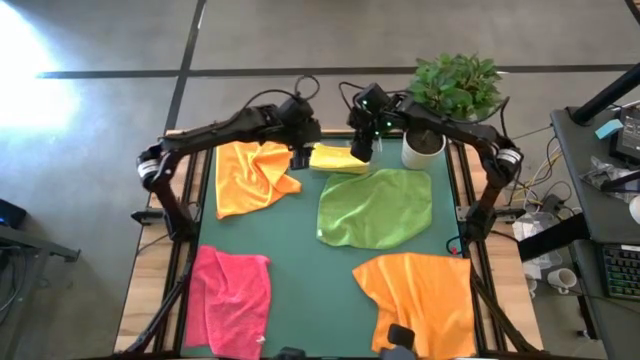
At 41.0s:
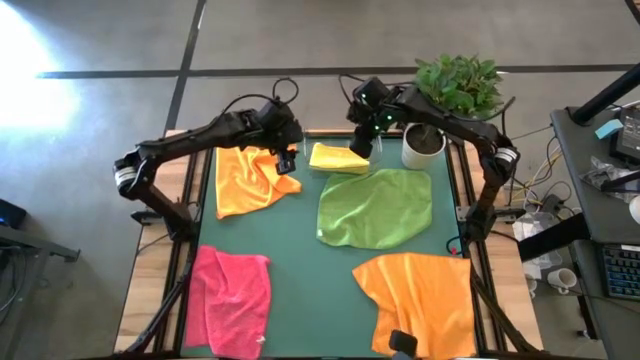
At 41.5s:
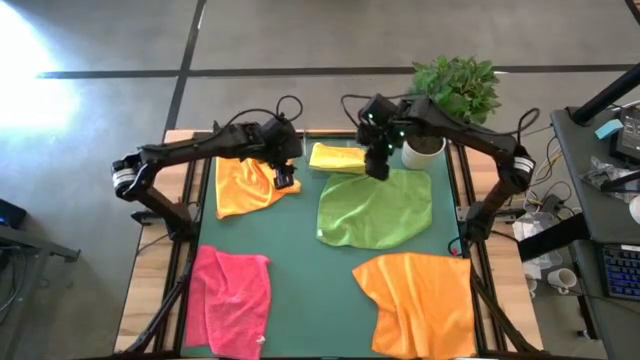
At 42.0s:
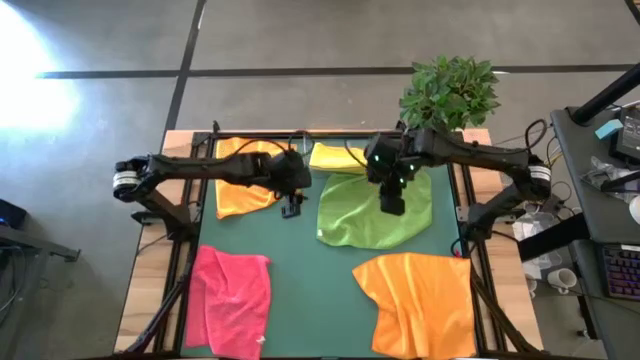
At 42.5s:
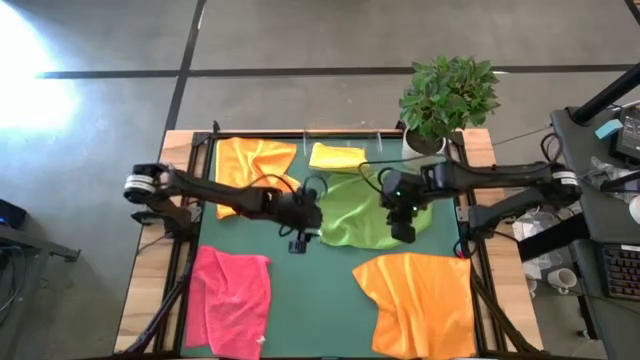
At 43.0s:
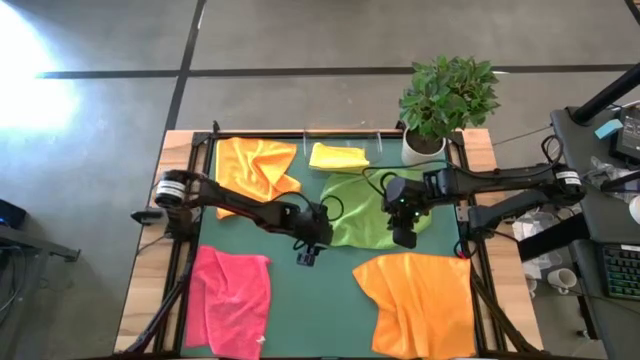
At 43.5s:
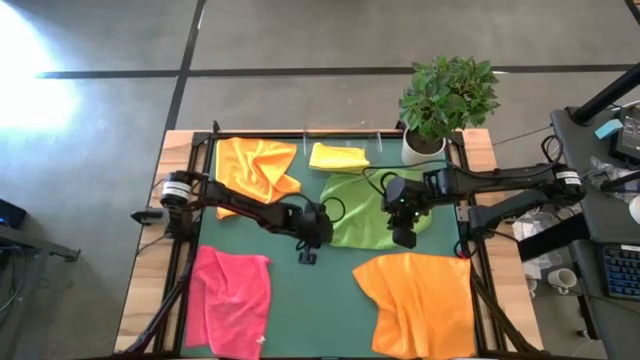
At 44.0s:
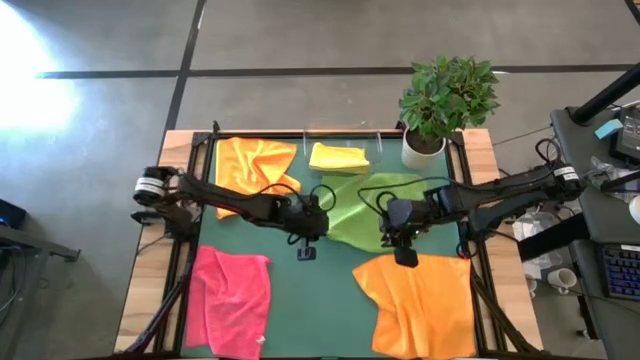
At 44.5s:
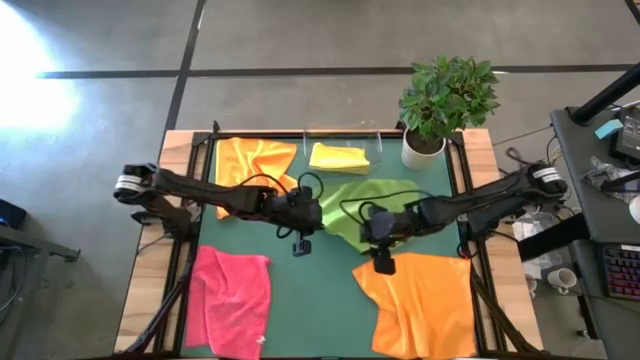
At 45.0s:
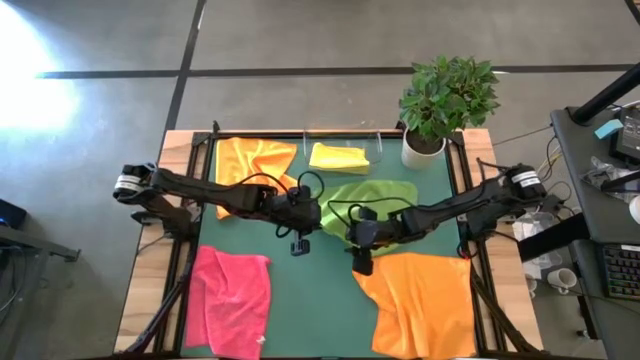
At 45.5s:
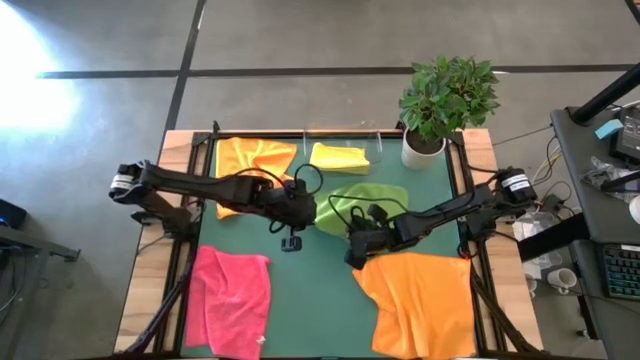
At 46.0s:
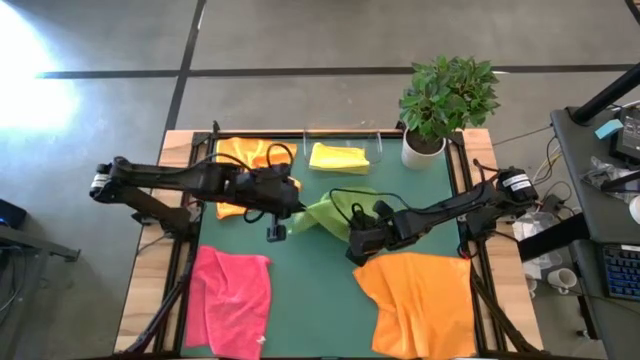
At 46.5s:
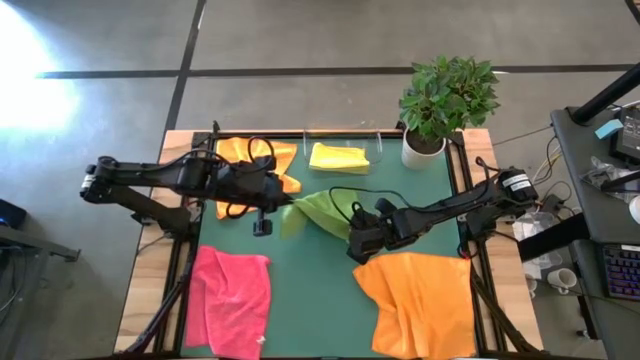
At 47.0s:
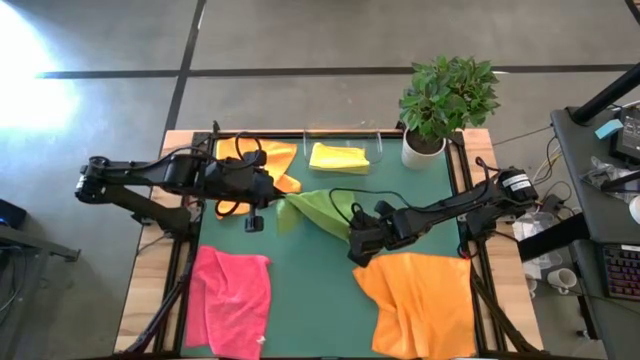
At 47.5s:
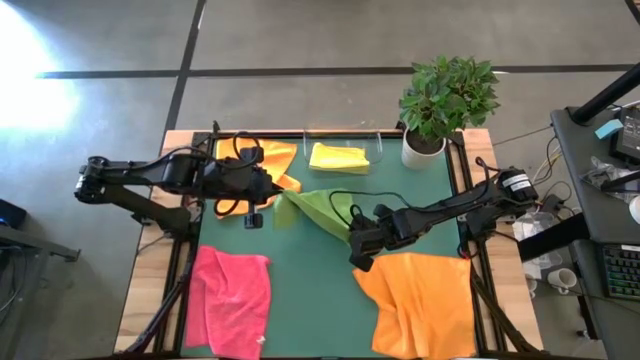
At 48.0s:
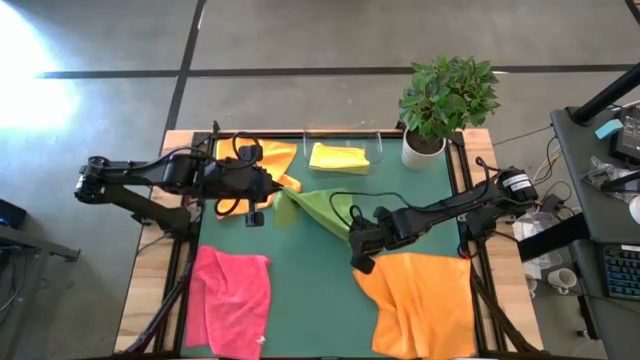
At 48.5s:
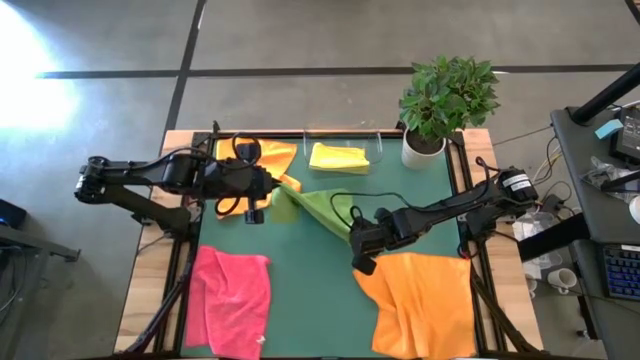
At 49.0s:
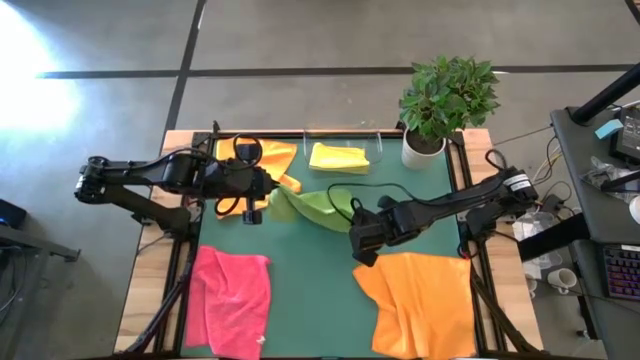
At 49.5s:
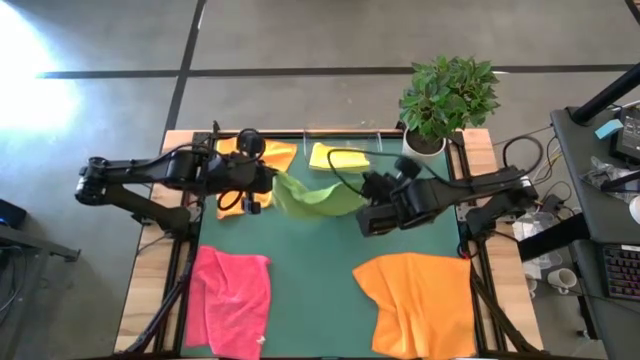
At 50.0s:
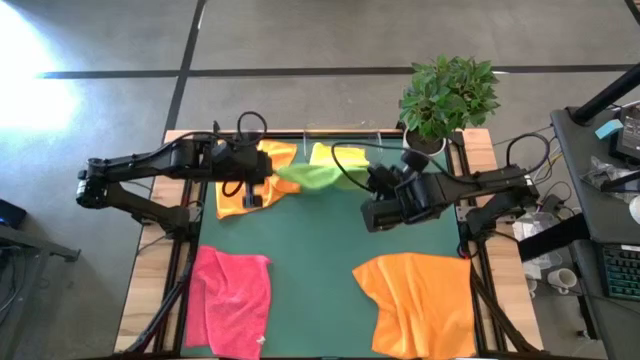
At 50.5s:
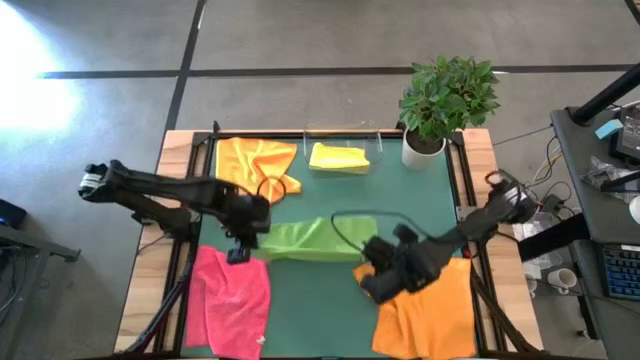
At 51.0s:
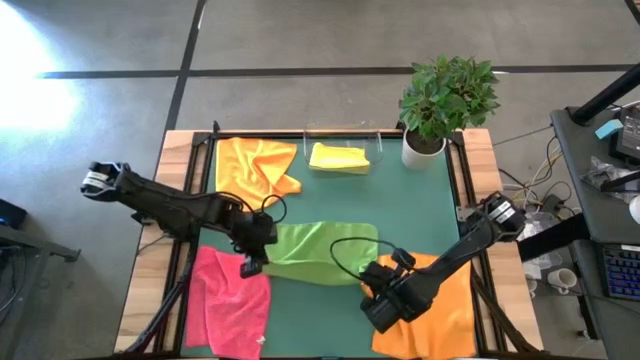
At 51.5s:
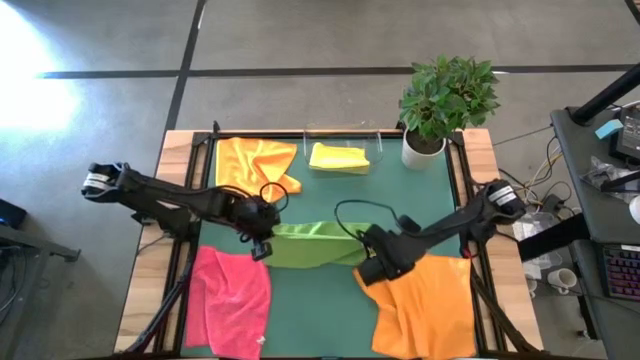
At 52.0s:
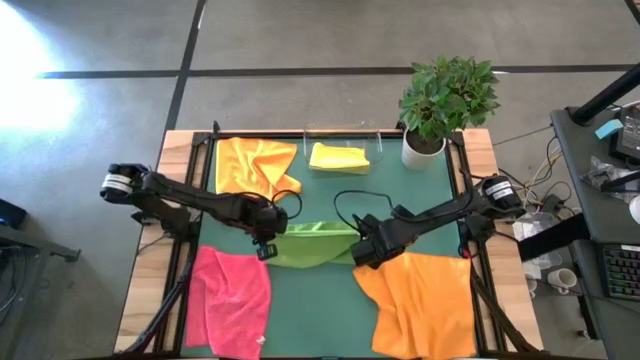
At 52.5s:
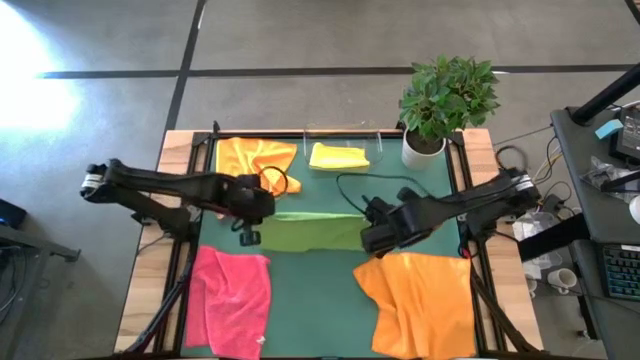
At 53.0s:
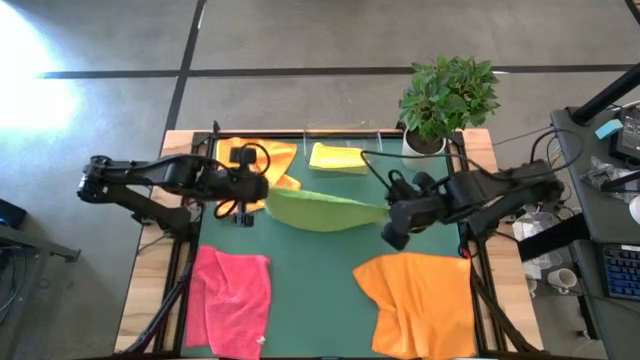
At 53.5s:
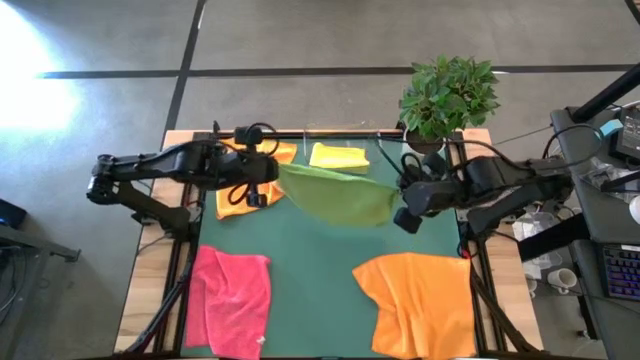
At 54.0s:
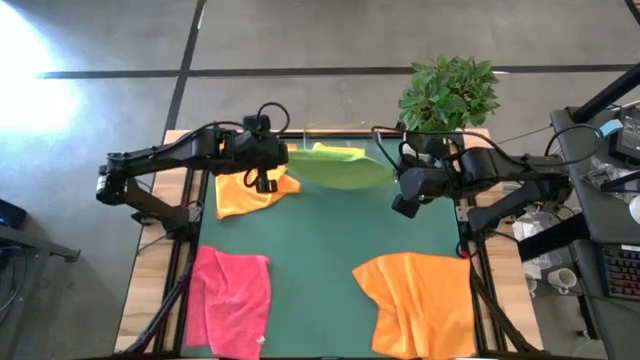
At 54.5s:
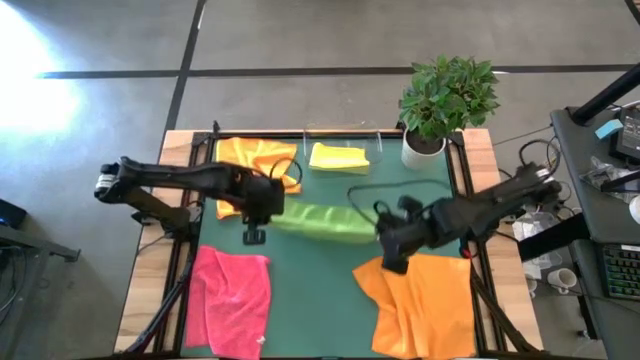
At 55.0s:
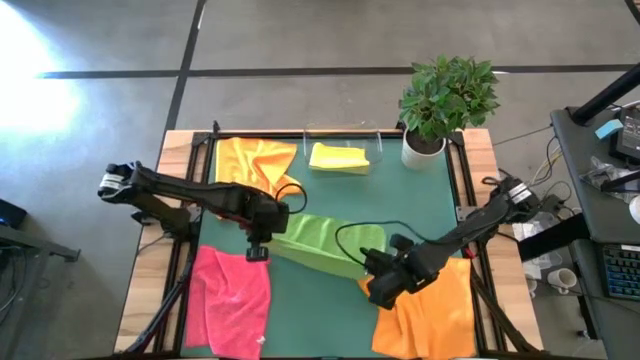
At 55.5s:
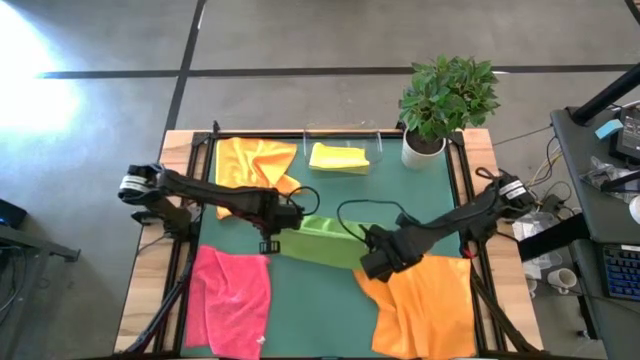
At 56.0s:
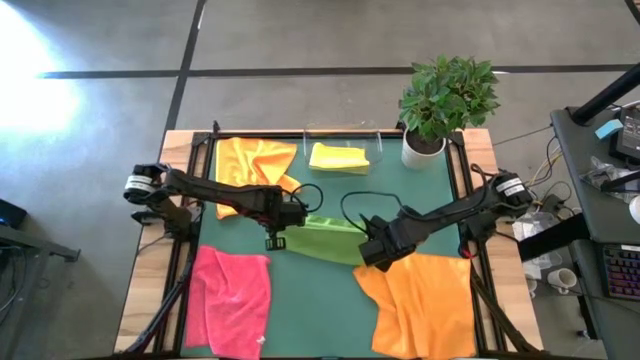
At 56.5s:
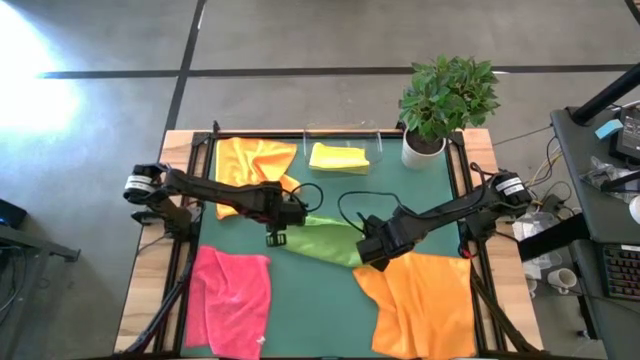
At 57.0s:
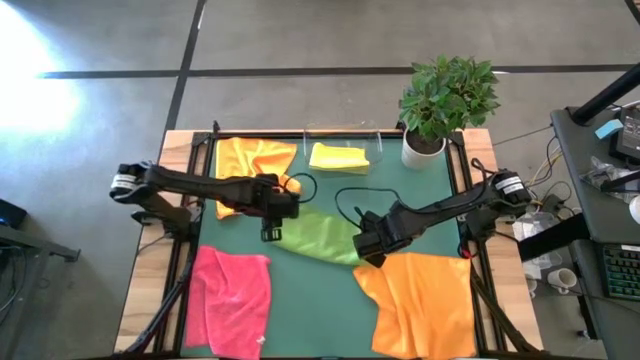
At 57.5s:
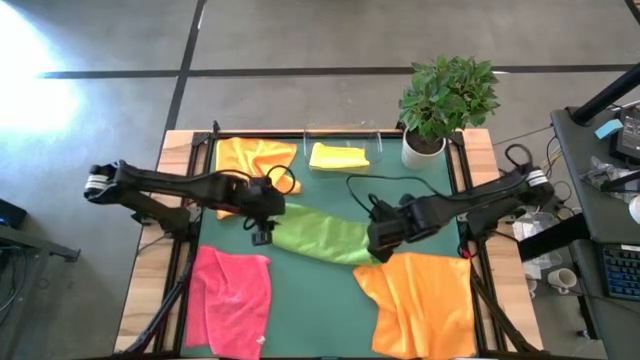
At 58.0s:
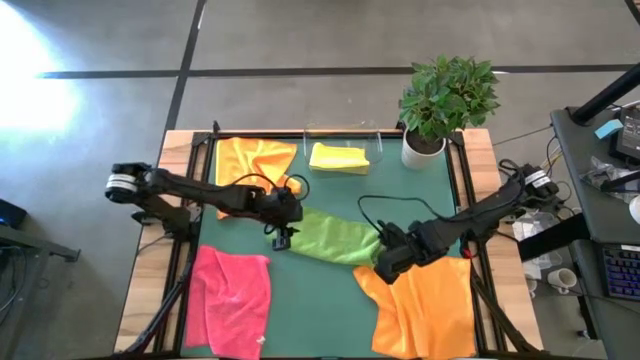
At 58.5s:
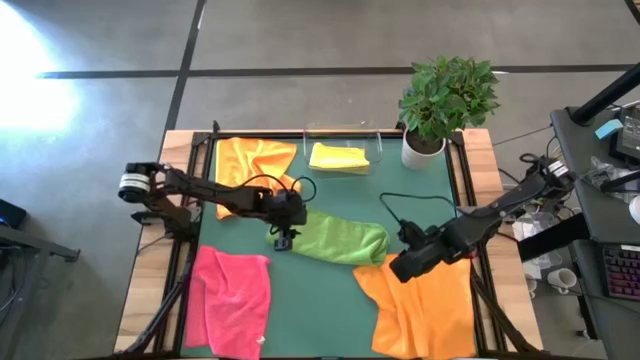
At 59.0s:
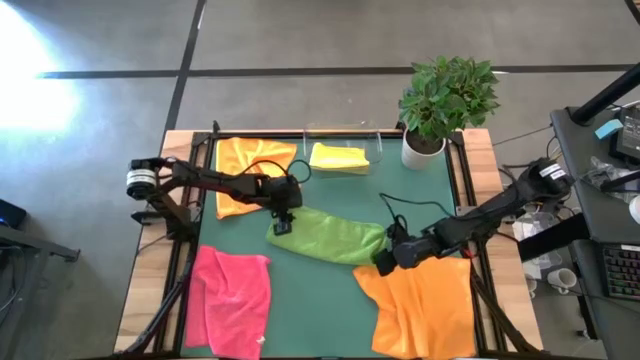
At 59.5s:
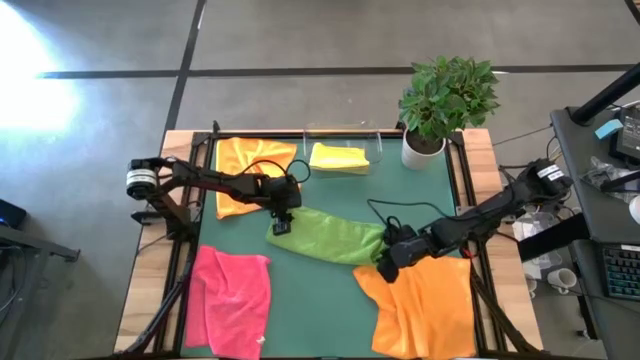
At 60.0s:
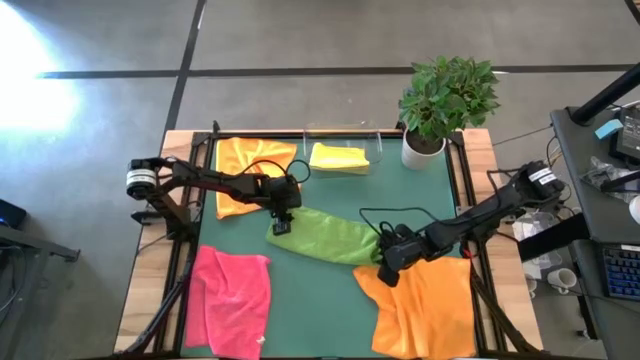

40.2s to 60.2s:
Task: Fold microfiber towels
Fold the green towel

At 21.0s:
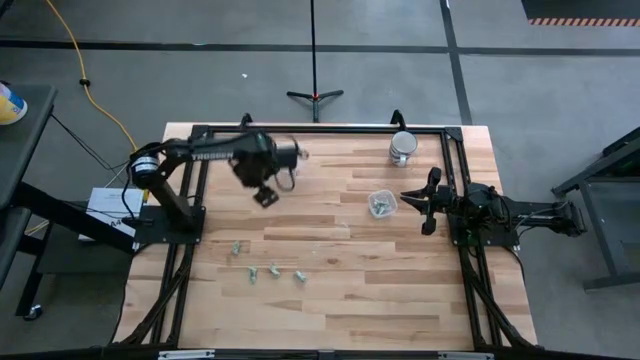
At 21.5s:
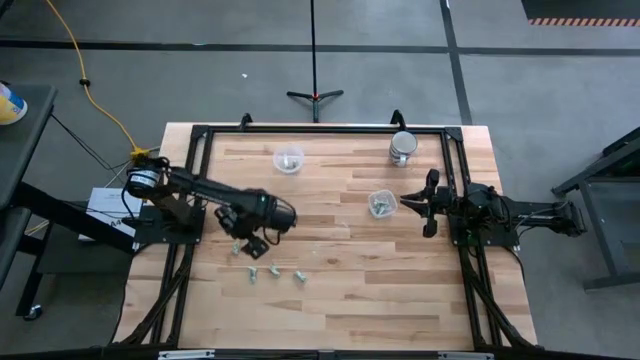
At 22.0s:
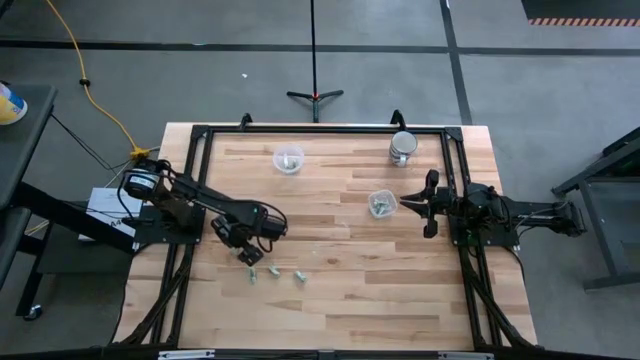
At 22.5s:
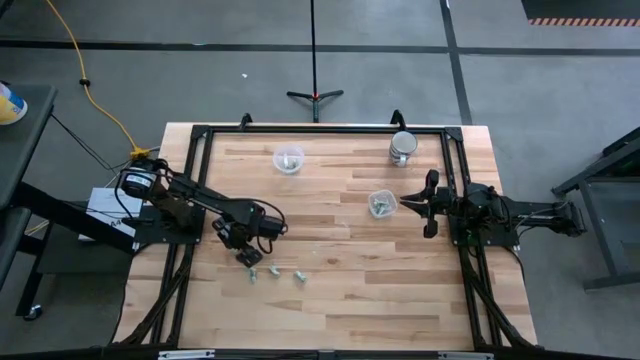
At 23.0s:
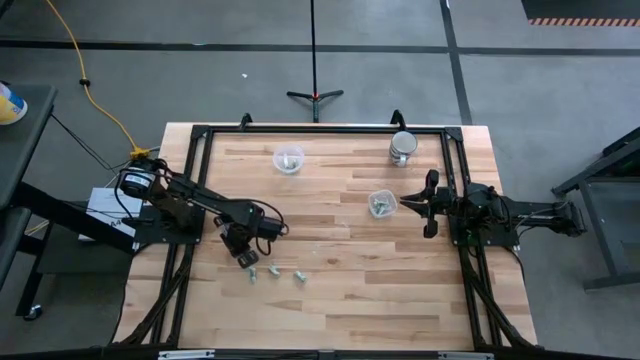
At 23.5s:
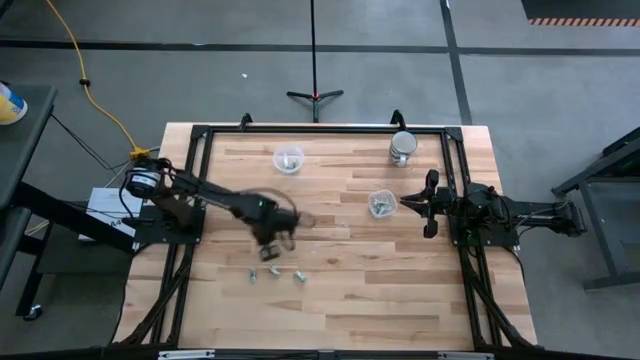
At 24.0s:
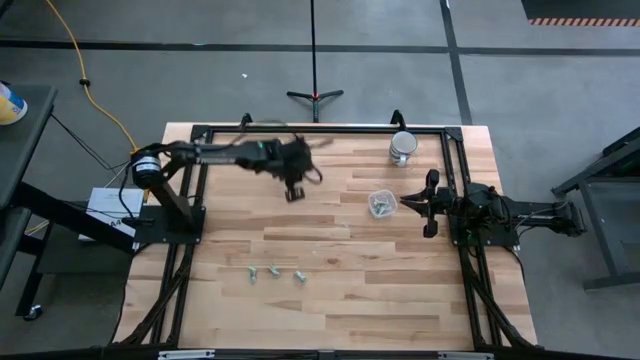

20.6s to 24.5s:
Task: Pick and place Stevia / Truvia into bins
Put the stevia packet into the round transparent container
